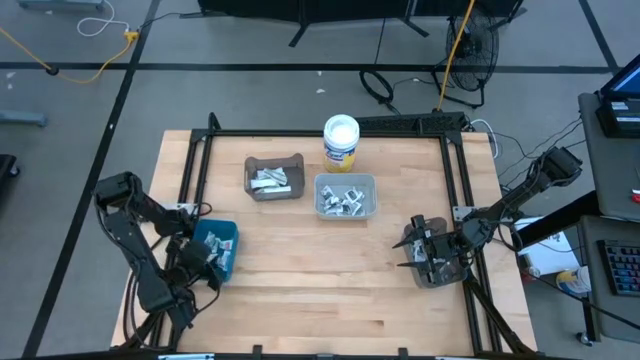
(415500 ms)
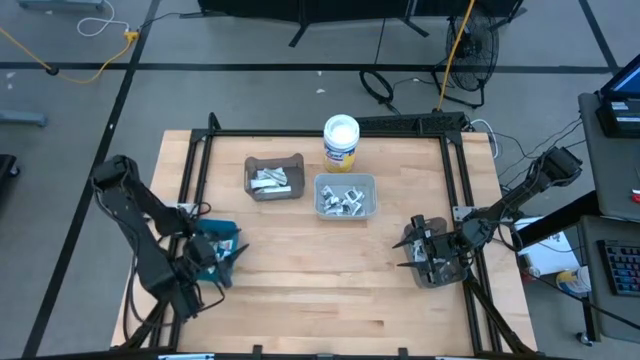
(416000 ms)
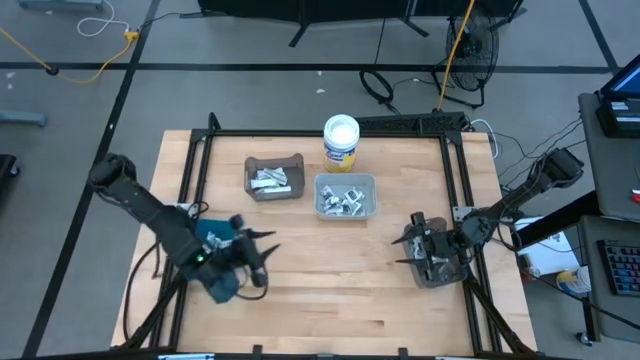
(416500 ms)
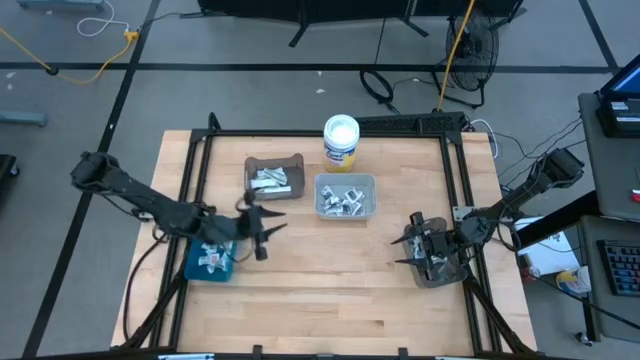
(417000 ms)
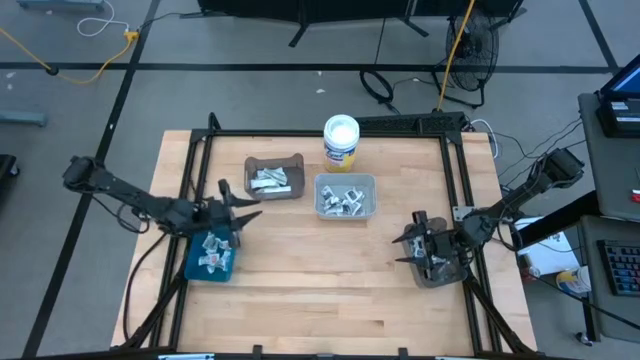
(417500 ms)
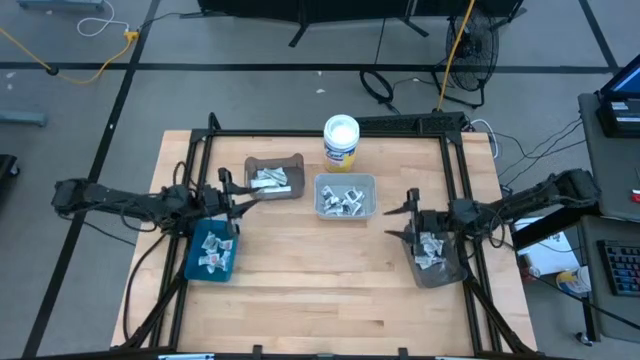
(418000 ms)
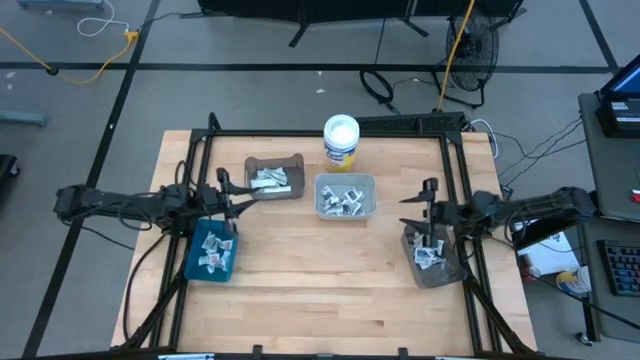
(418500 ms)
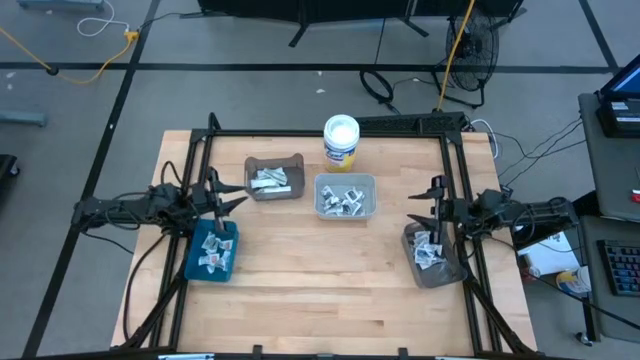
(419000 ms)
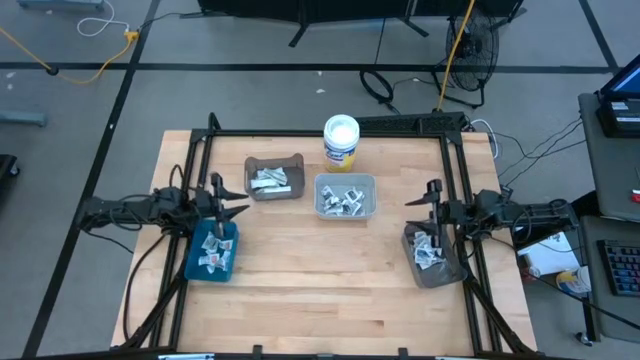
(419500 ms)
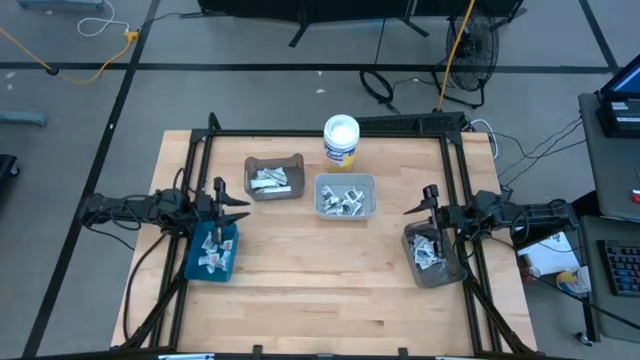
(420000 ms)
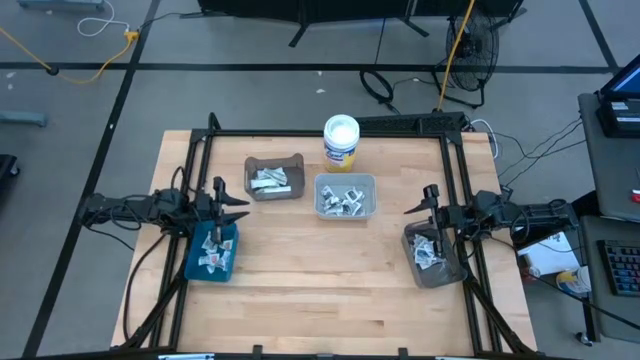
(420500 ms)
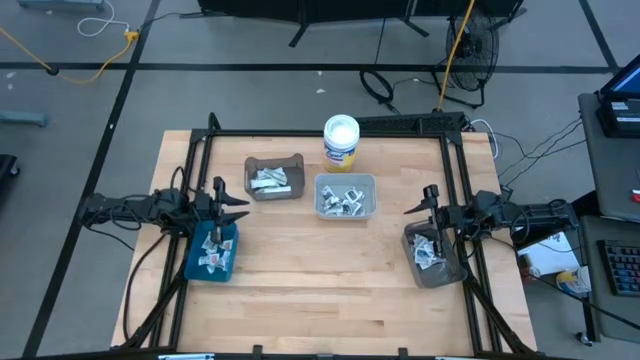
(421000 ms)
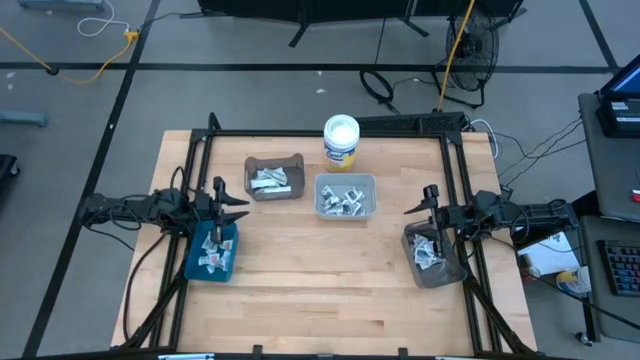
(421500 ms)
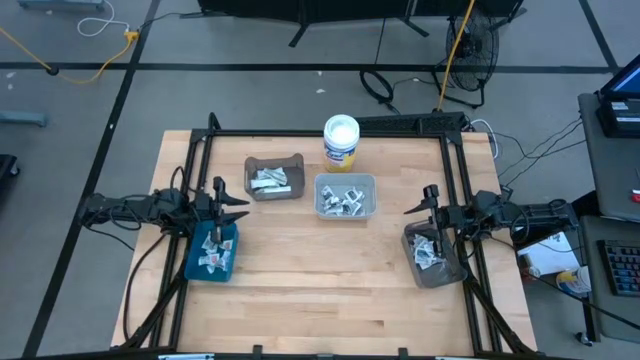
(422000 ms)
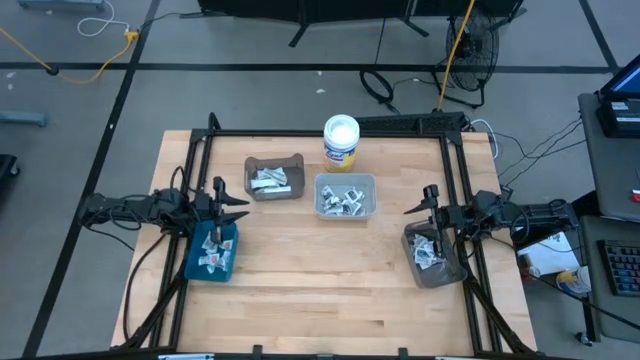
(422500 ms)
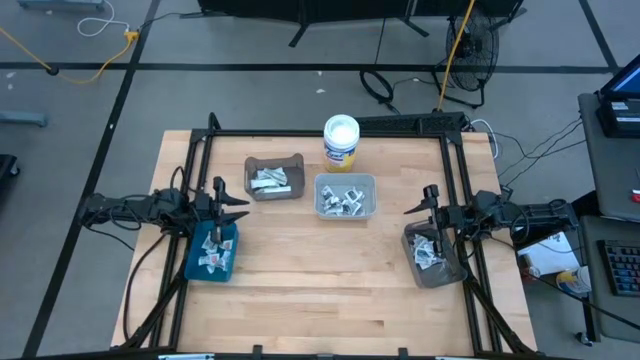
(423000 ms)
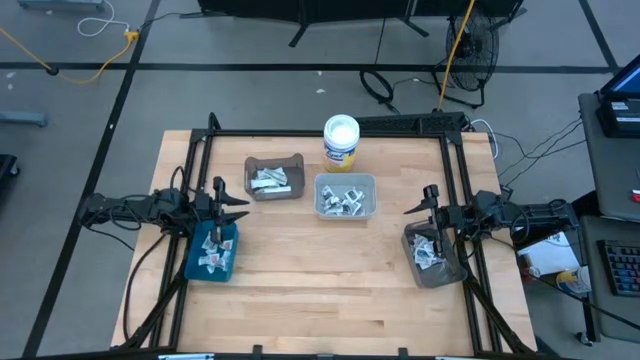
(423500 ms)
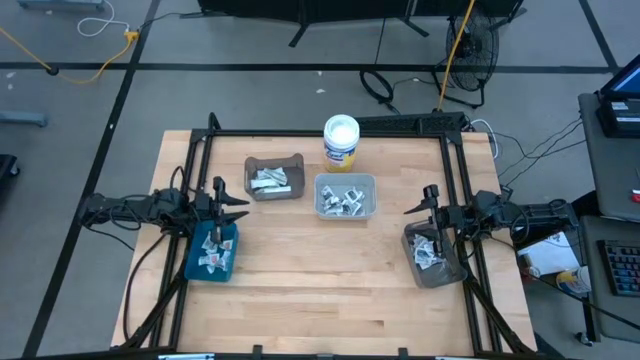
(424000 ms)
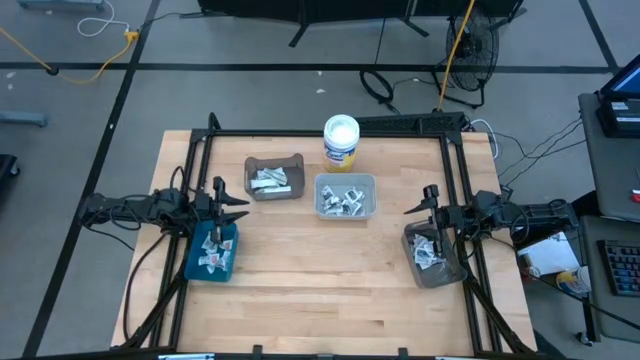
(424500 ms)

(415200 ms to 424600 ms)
Task: Pick & Place First Aid Supplies
Return to Home Position

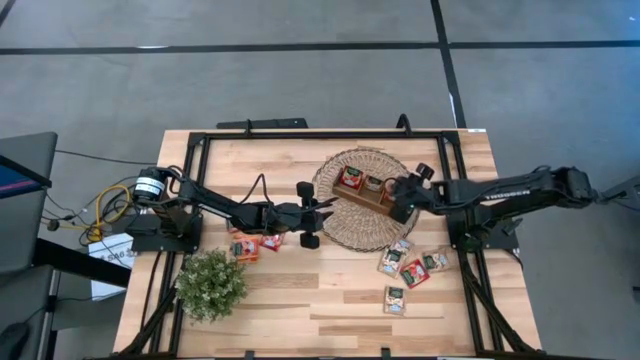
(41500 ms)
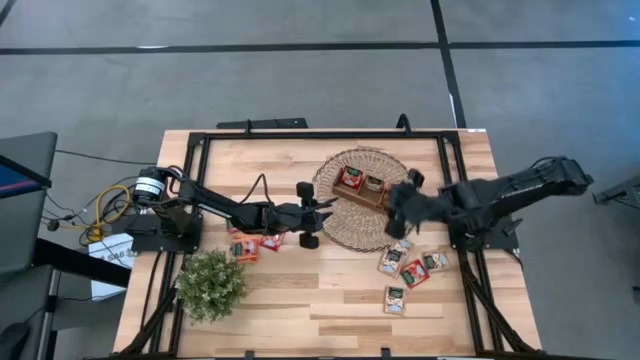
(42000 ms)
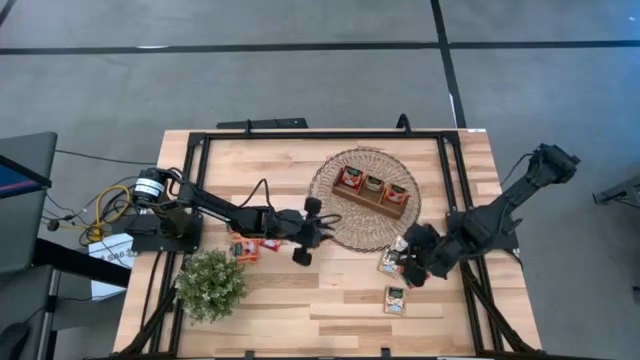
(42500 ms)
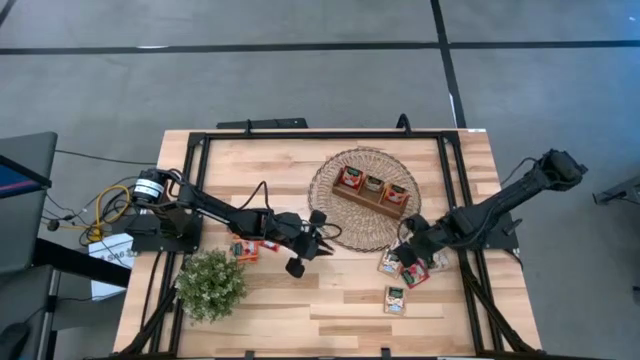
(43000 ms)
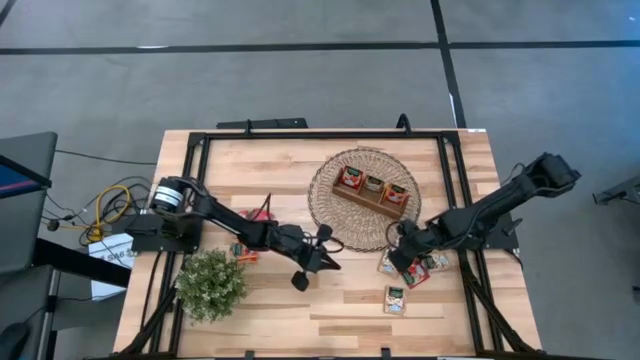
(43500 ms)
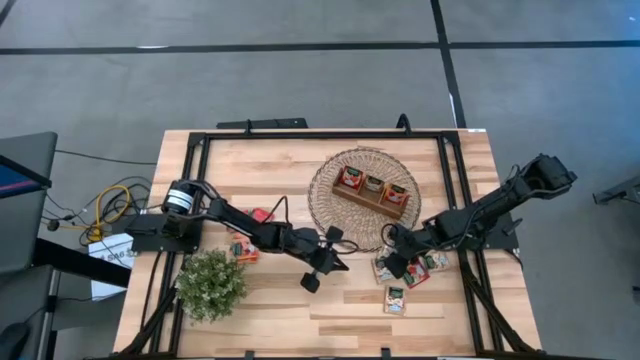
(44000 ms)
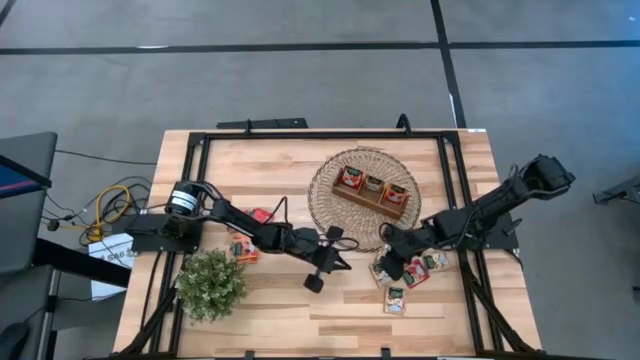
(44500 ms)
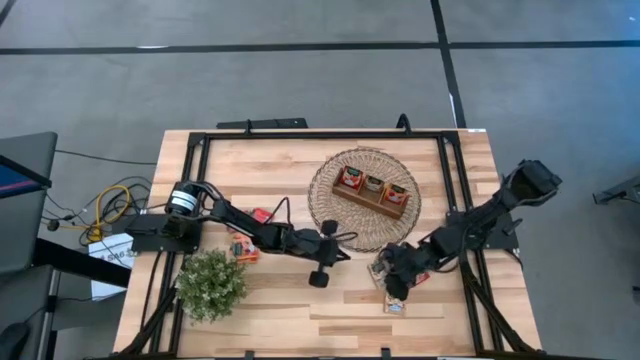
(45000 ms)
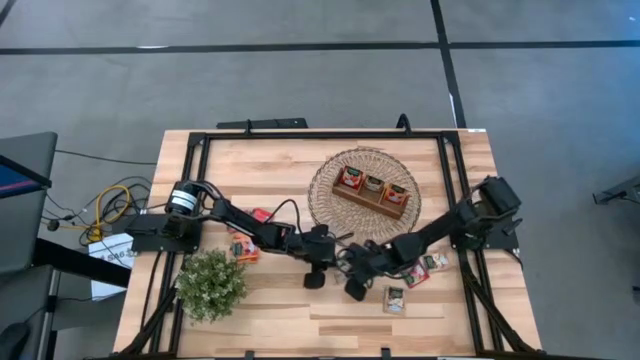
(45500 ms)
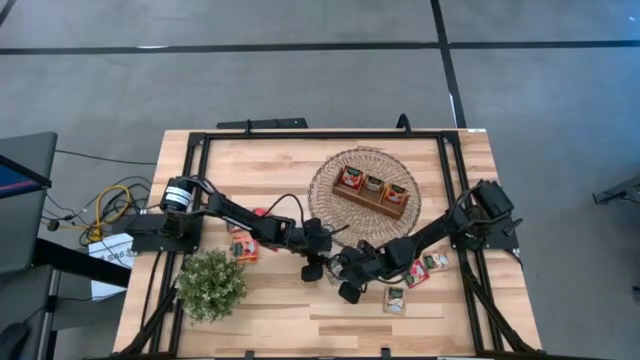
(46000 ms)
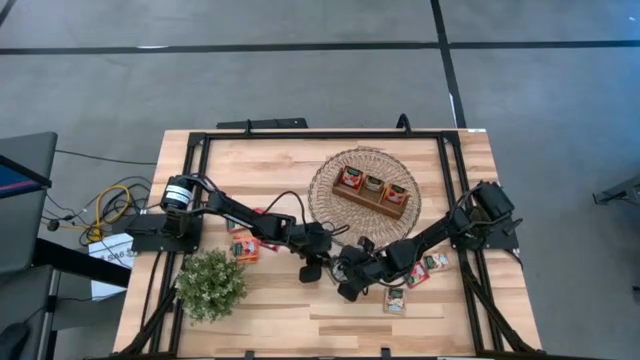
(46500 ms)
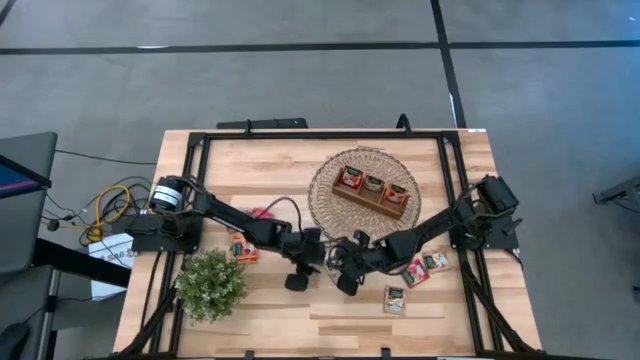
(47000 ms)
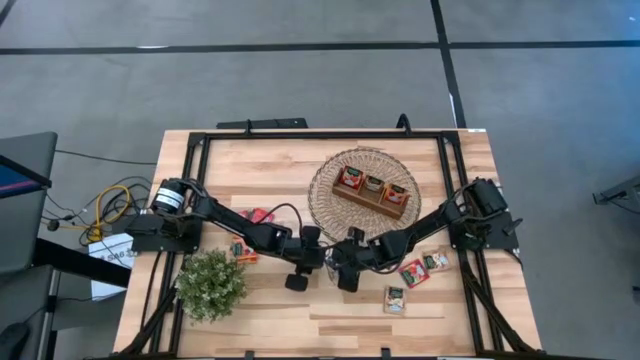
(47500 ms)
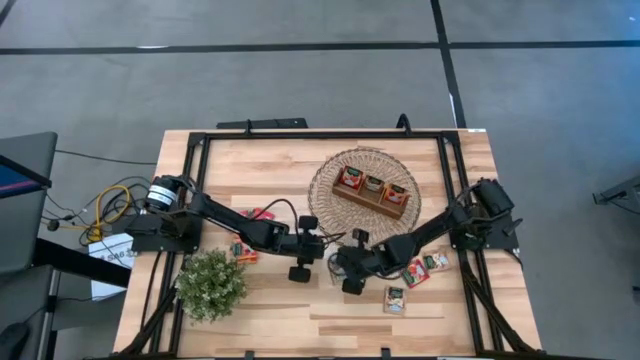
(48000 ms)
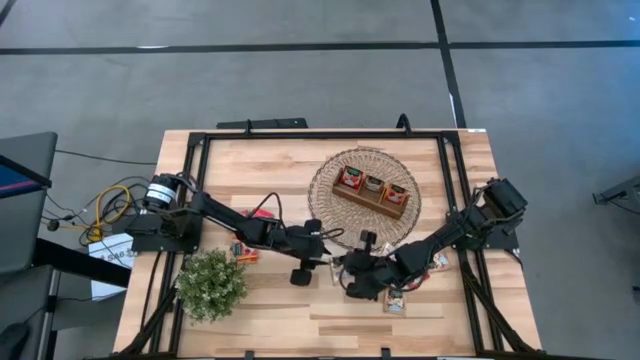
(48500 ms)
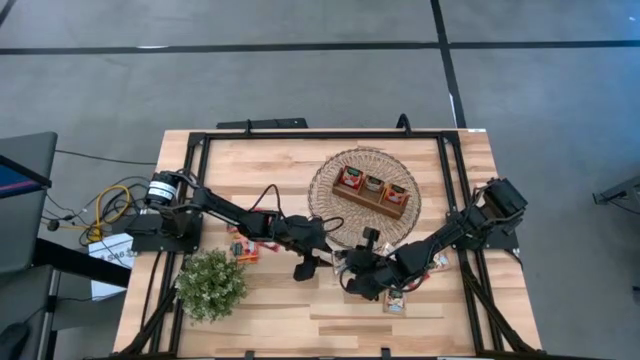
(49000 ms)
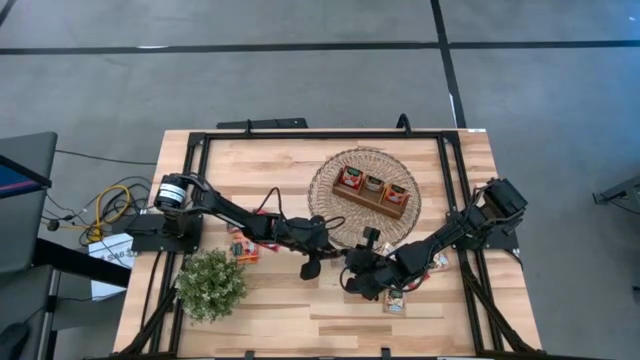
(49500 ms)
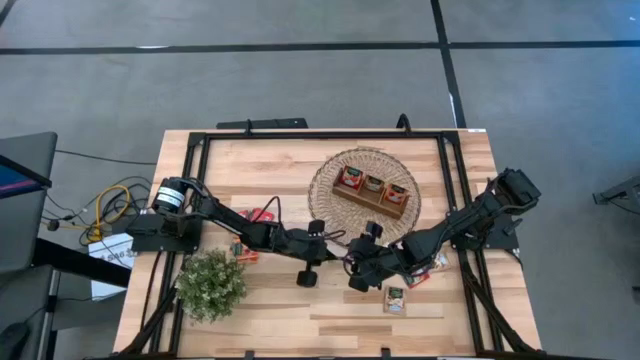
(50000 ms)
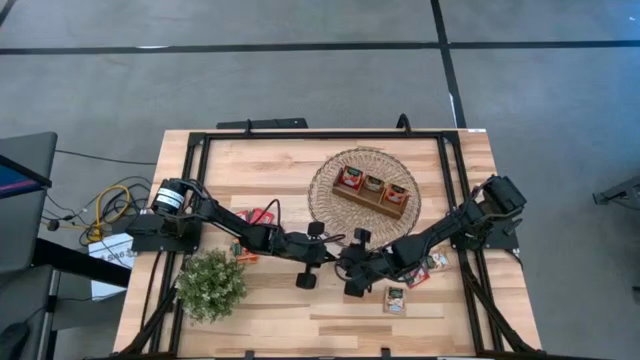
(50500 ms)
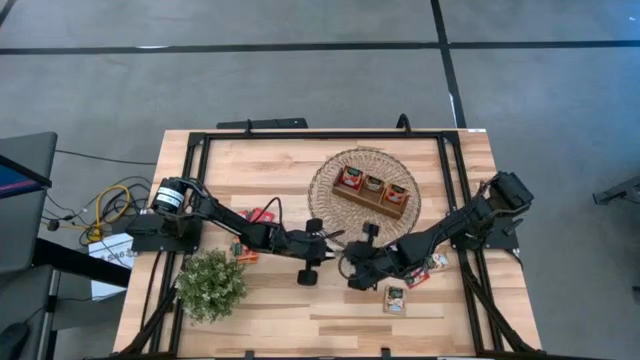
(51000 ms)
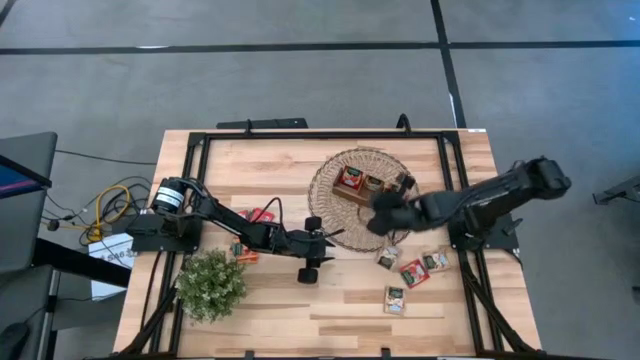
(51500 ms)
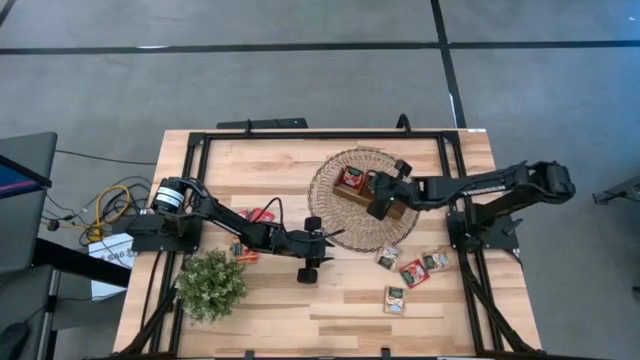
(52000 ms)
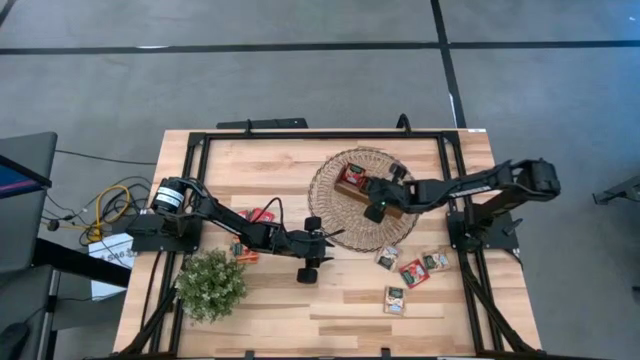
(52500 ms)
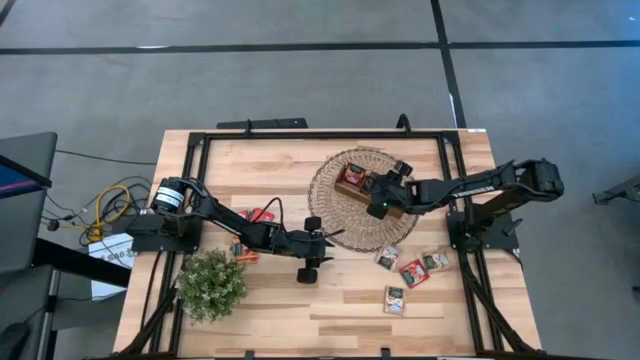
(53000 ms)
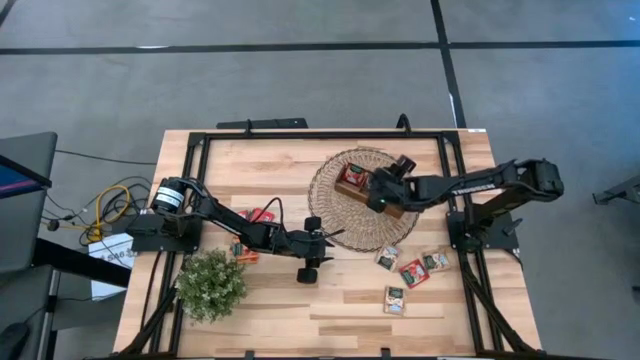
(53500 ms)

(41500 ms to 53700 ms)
Task: Pick & Place Tea
Put the brown tea bag into the middle section of the wooden organizer
